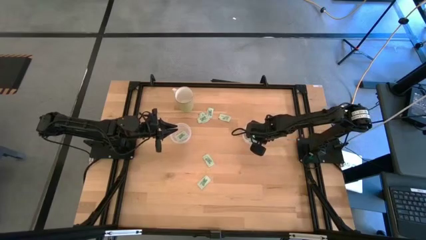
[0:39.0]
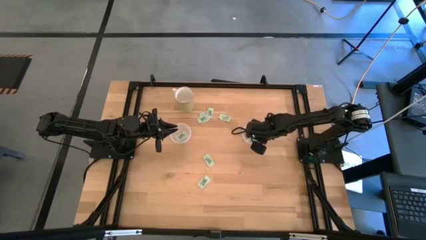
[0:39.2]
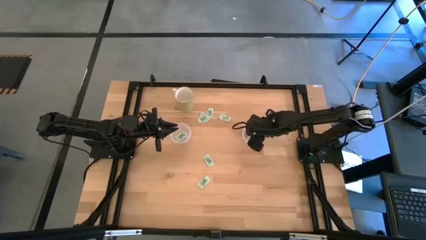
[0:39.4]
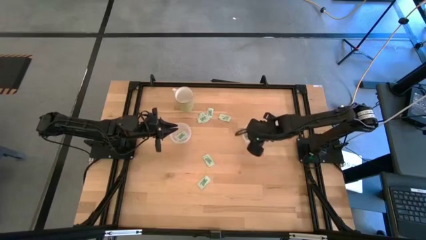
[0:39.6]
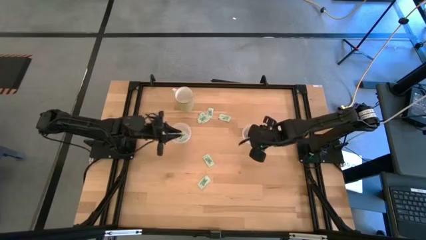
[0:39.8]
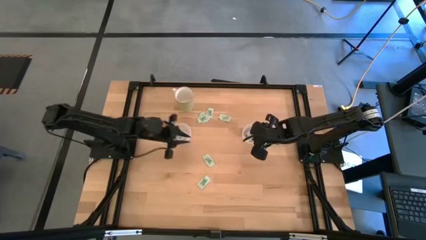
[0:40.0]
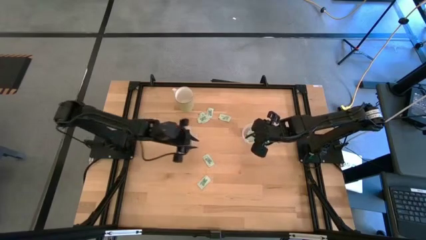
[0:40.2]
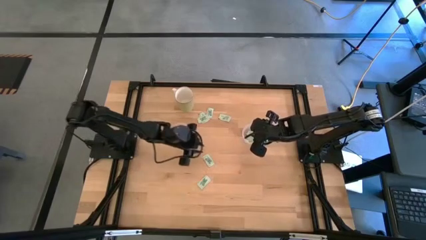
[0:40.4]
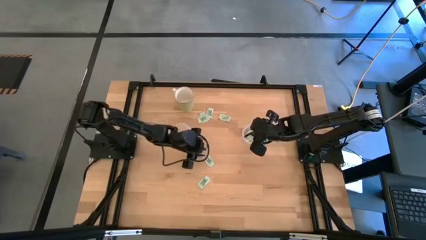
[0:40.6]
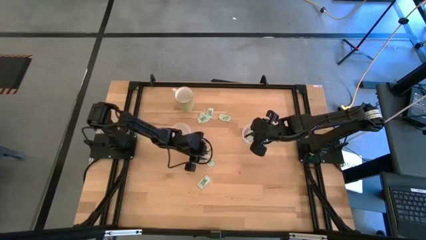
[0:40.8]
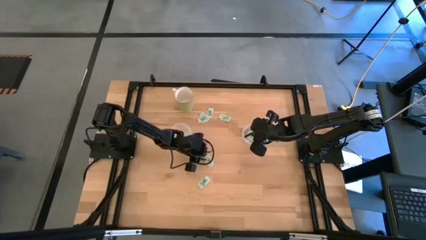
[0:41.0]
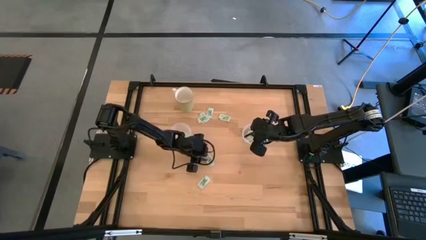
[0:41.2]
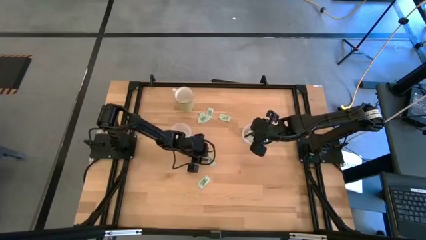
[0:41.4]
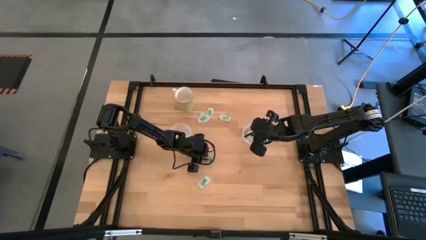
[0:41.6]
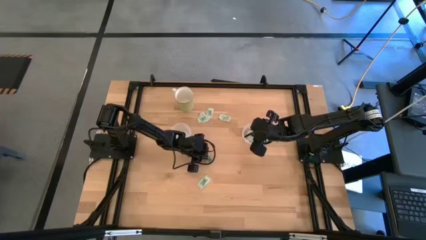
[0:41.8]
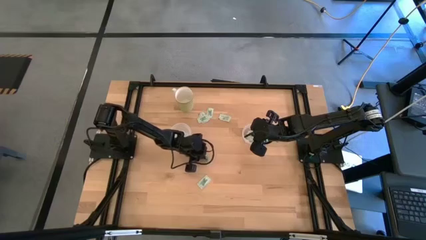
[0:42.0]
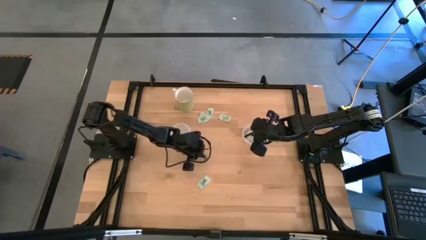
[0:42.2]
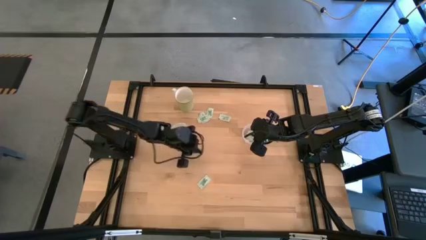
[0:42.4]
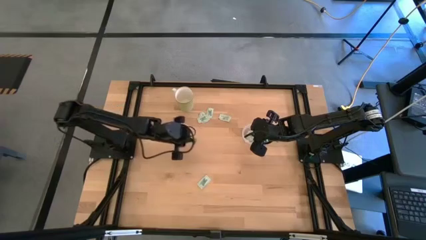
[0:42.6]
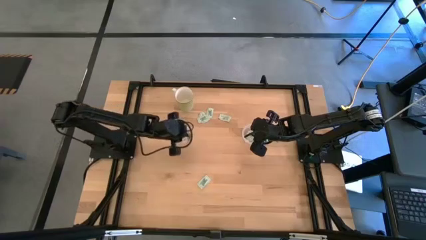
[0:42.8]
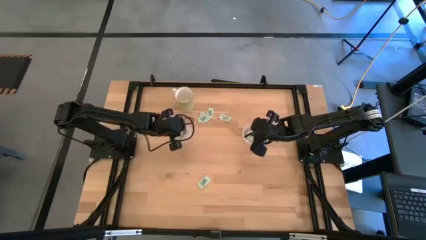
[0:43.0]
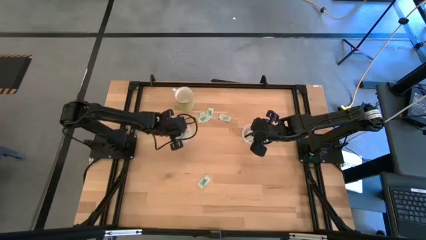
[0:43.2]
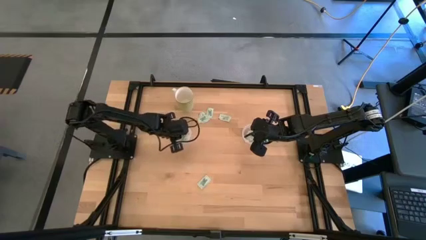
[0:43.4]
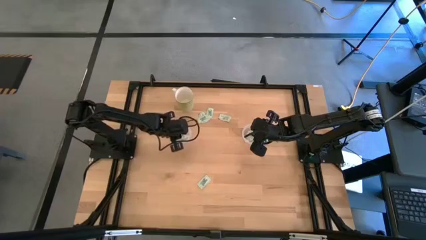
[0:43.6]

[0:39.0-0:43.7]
Task: Pick and place Stevia / Truvia into bins
Put the stevia packet into the left transparent container

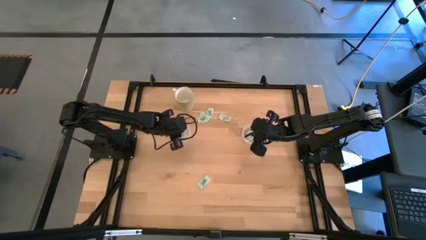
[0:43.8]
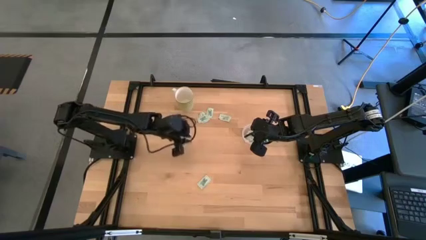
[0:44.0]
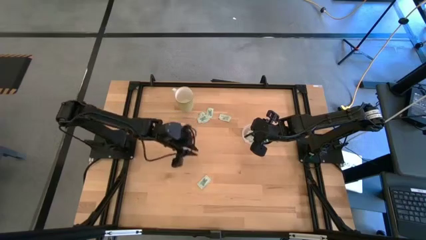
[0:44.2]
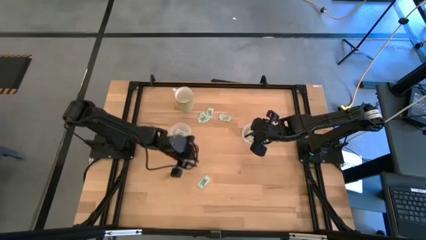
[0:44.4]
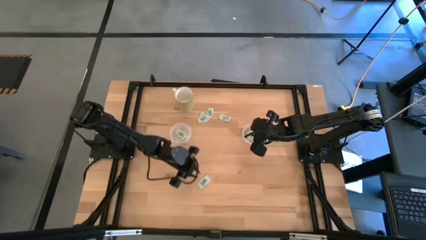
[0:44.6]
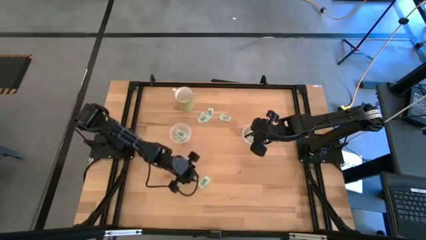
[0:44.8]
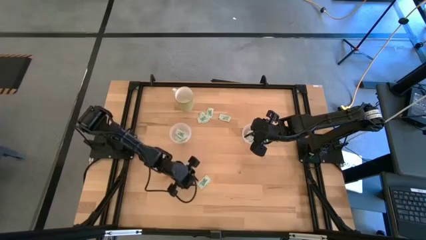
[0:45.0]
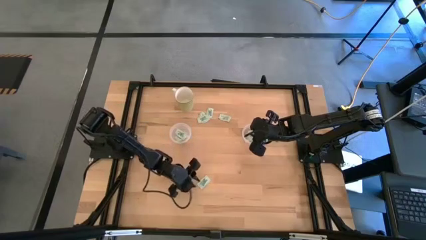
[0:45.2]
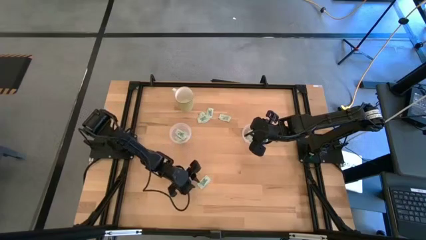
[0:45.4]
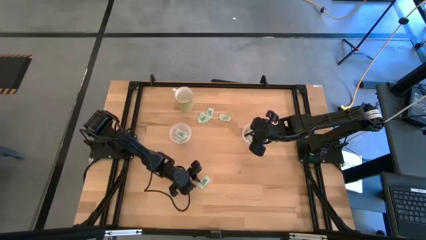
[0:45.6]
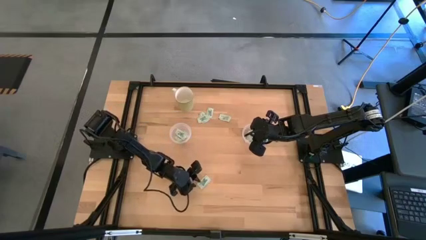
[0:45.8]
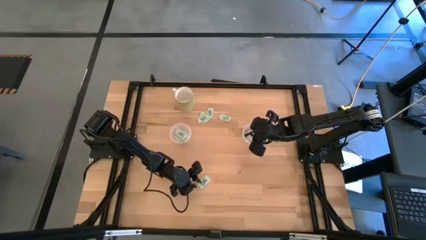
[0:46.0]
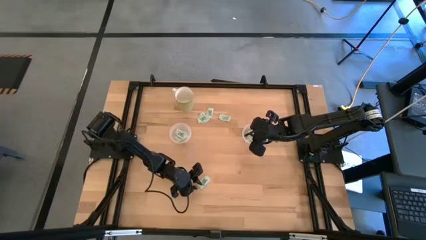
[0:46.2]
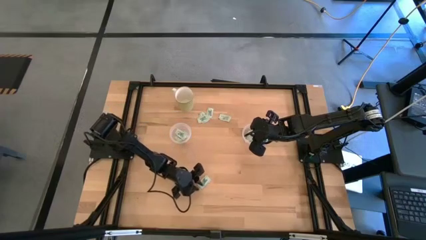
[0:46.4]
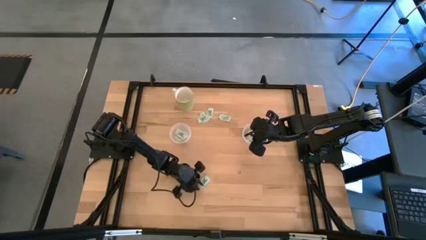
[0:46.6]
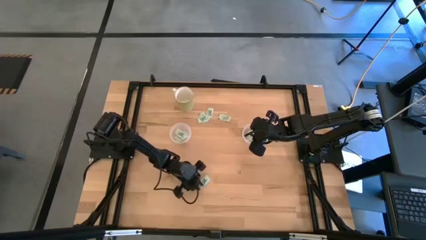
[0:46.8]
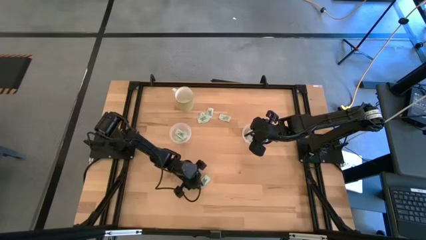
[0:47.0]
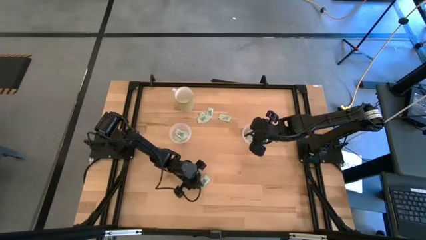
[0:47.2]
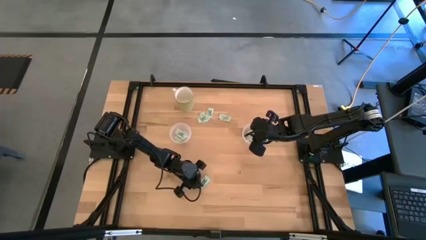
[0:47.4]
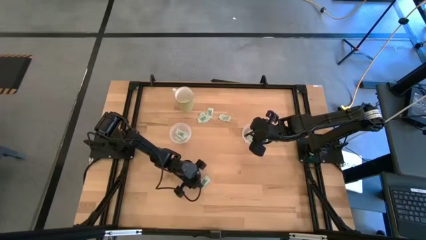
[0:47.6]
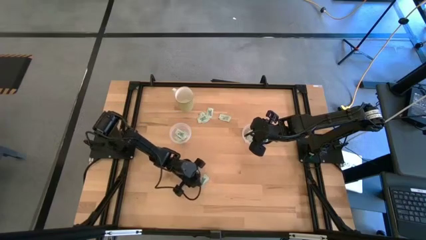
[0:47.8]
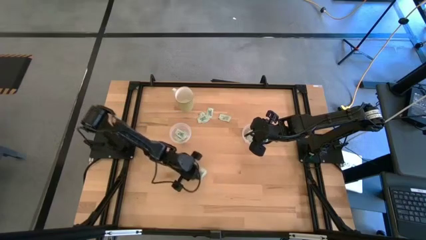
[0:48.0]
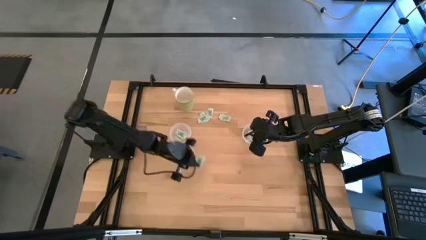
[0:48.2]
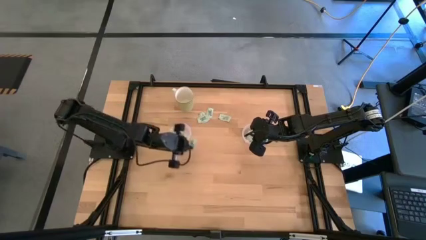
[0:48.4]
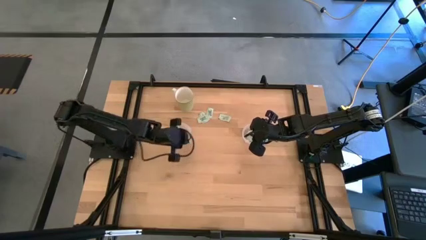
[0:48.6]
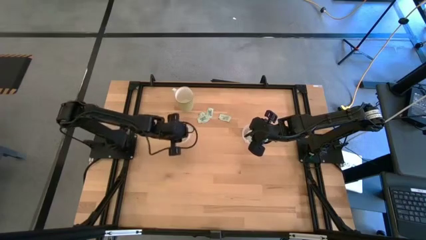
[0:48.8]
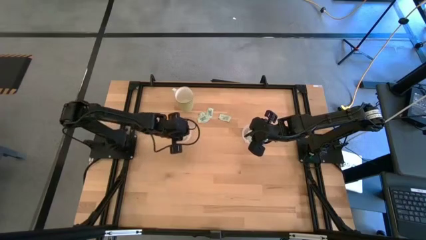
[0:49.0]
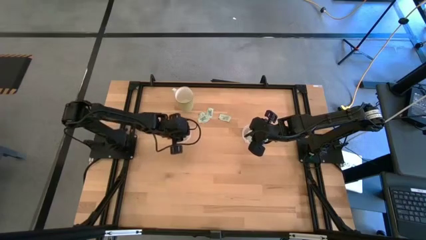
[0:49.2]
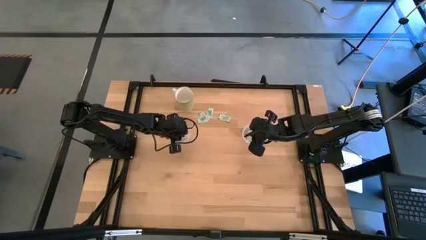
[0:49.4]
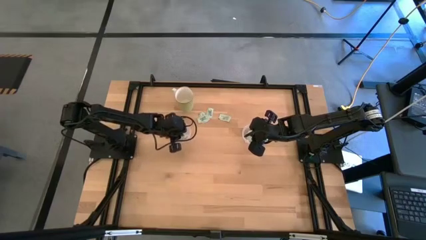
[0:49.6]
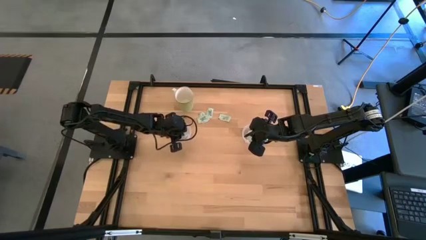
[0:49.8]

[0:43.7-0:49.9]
Put the stevia packet into the left transparent container

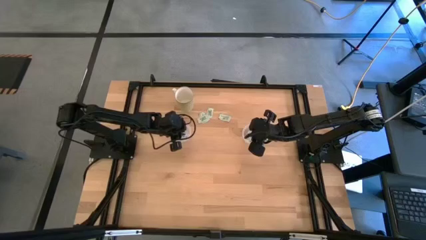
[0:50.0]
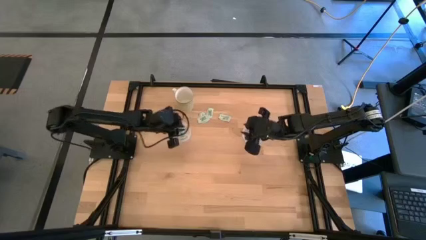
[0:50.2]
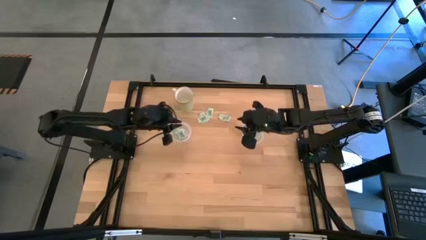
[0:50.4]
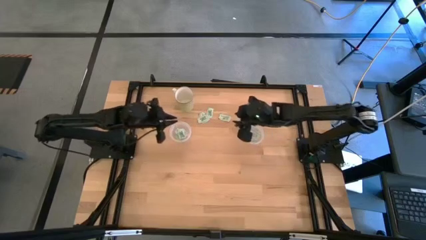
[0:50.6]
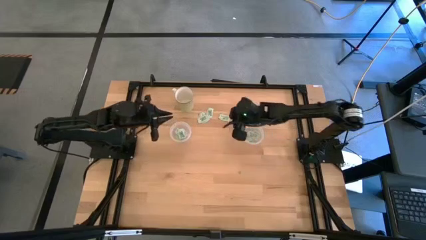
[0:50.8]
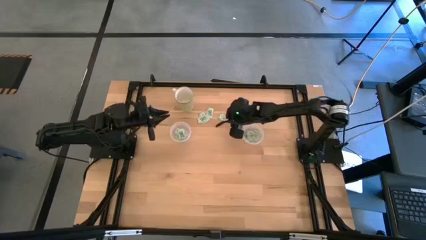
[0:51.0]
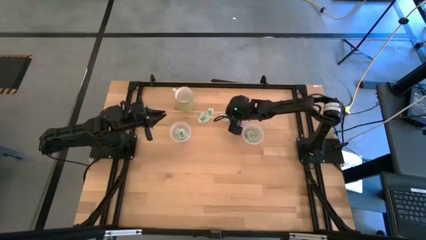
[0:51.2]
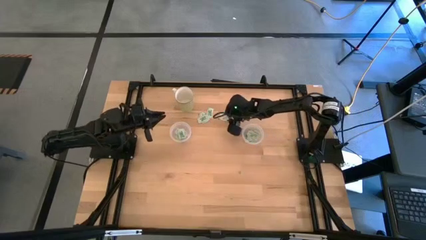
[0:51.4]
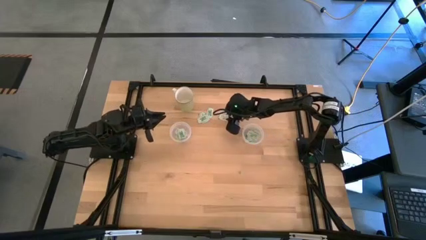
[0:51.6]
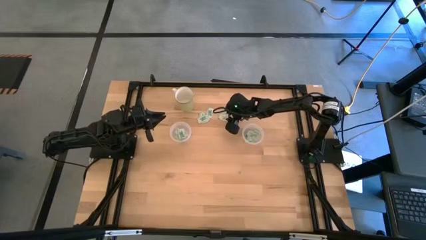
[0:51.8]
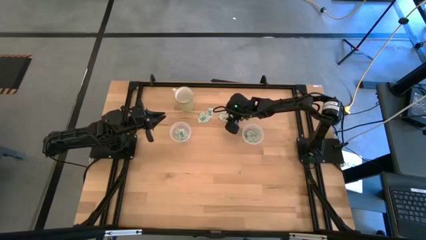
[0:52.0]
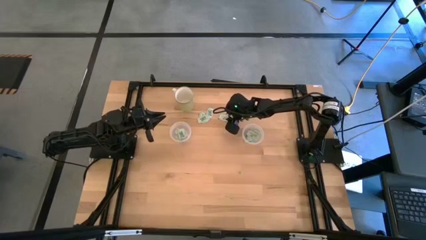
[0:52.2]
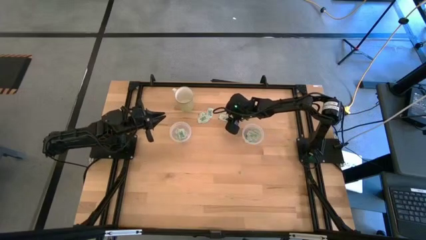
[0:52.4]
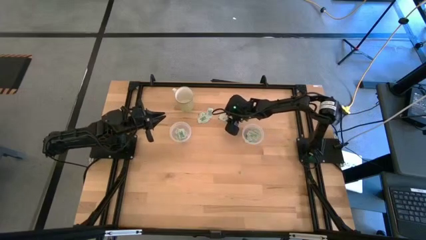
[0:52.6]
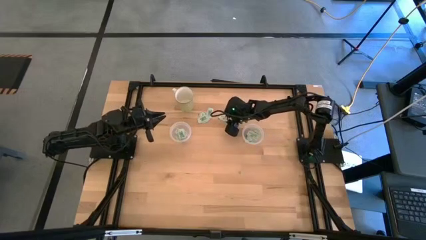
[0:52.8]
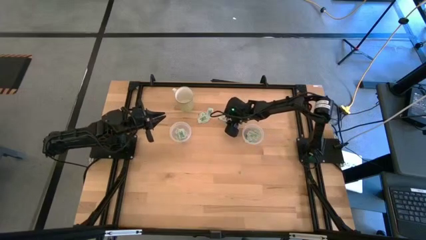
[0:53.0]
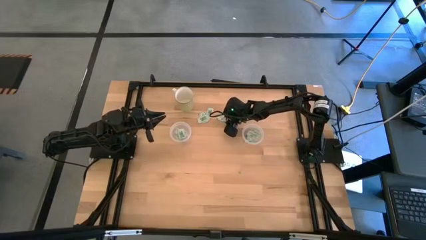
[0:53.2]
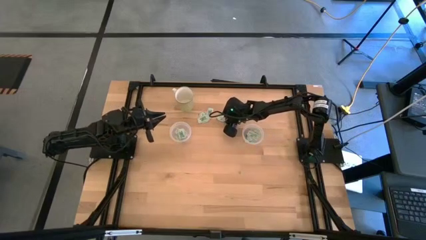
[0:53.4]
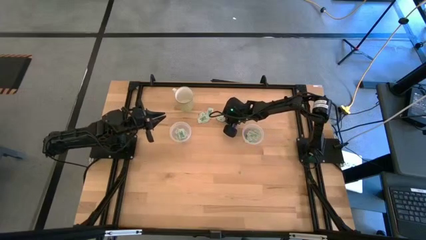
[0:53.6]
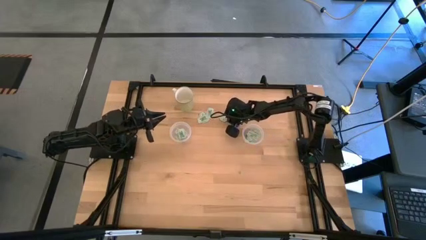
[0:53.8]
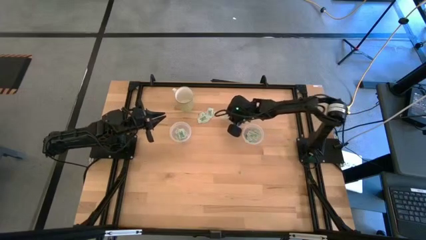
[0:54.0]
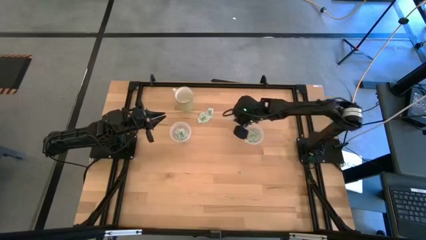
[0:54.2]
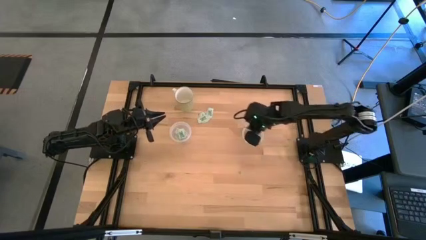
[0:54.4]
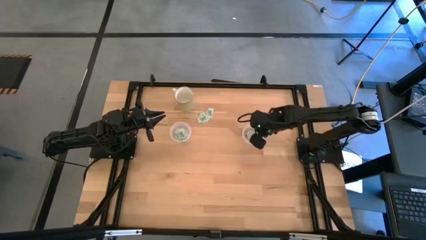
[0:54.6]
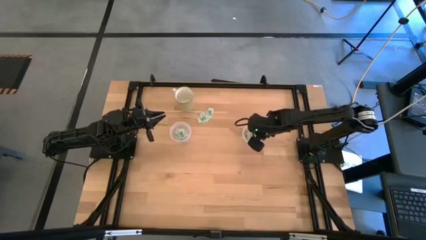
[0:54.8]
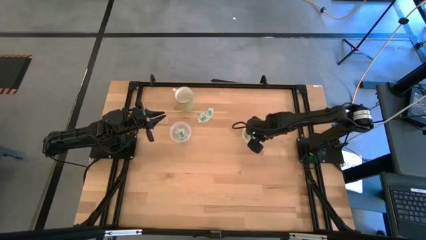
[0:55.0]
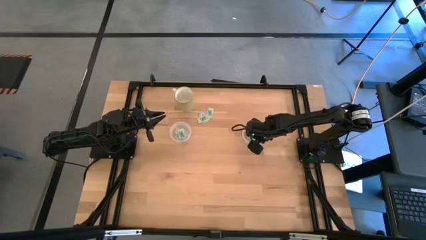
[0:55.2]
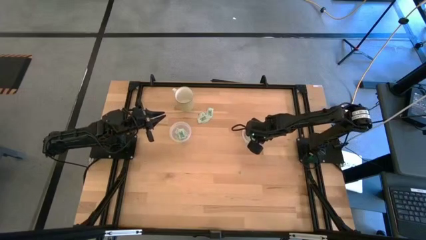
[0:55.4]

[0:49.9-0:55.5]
Put the stevia packet into the right transparent container

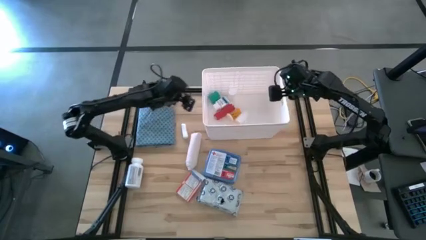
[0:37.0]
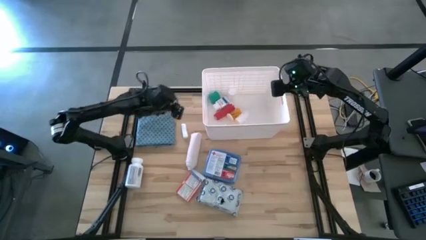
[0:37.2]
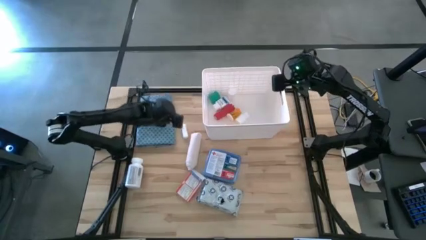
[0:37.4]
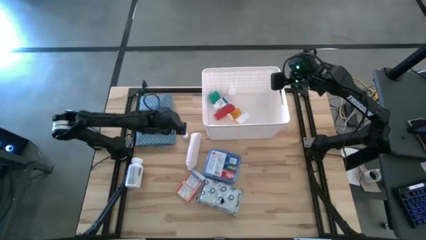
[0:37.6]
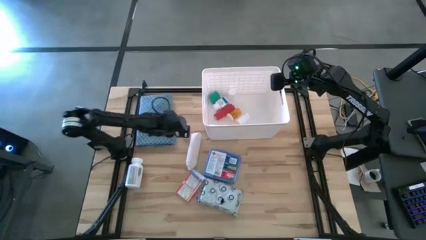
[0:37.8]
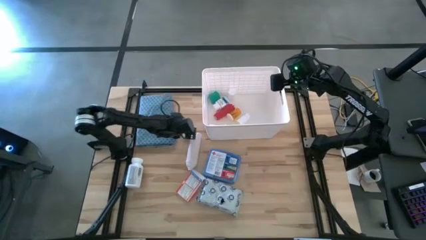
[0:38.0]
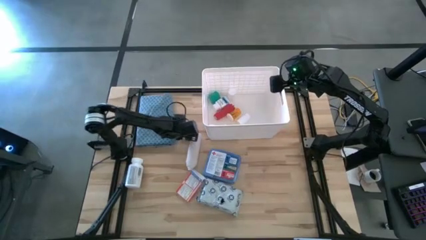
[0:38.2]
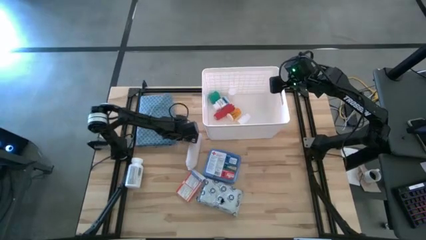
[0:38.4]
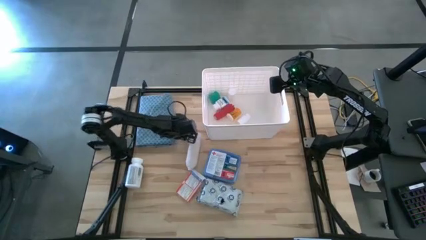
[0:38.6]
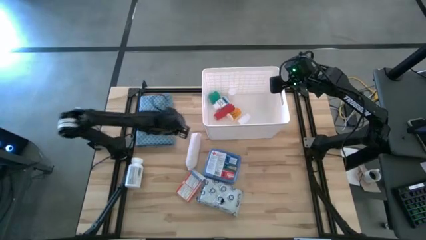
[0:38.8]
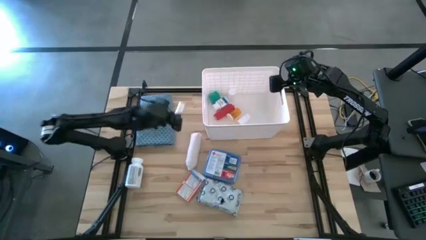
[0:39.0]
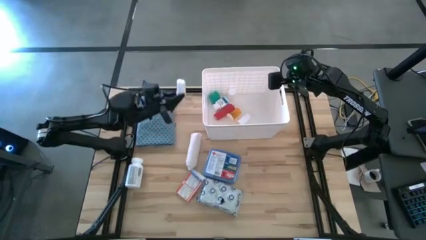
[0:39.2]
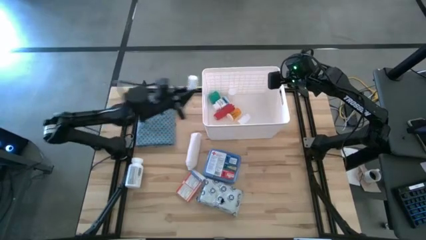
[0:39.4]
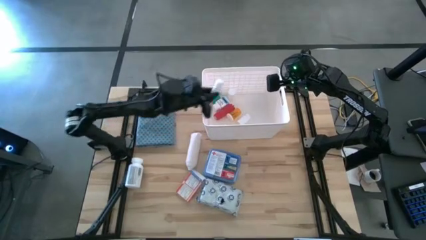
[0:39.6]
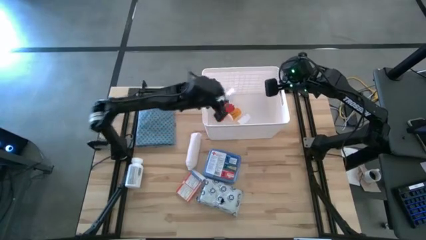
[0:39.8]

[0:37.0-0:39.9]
Task: Pick & place medical supplies in basket/bin
Put the rolled white gauze into the white bin
